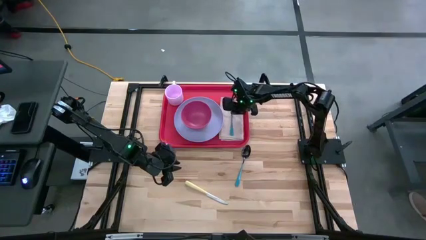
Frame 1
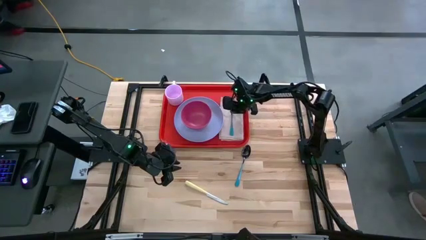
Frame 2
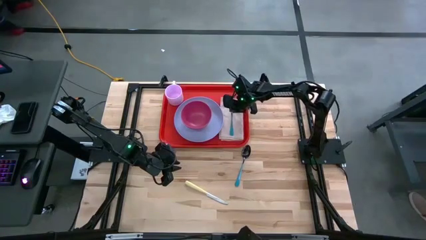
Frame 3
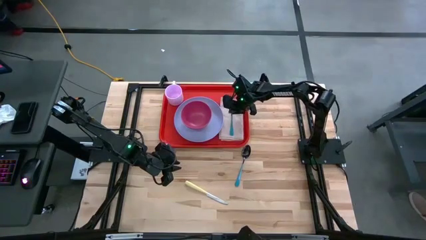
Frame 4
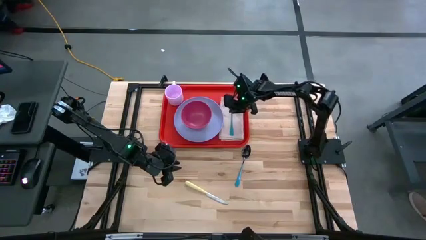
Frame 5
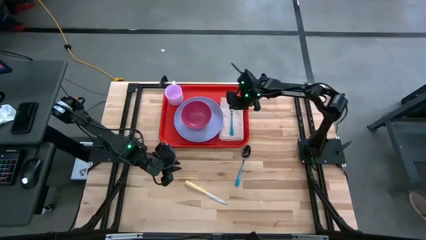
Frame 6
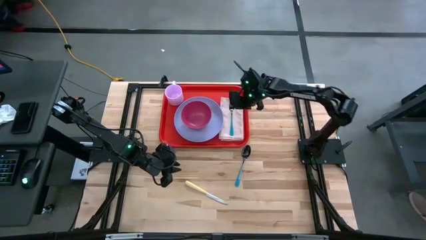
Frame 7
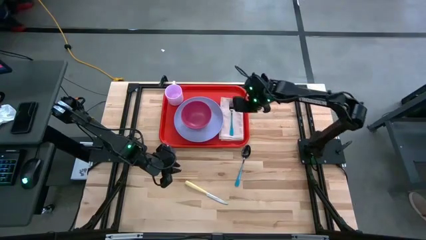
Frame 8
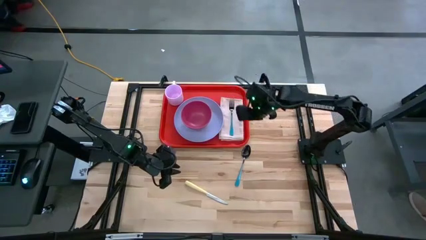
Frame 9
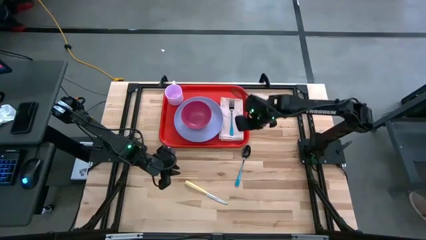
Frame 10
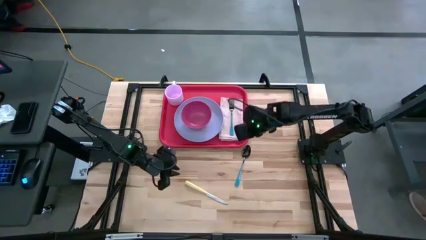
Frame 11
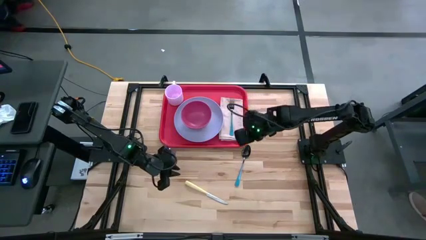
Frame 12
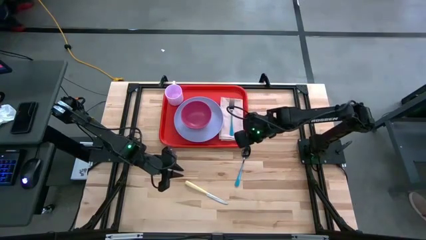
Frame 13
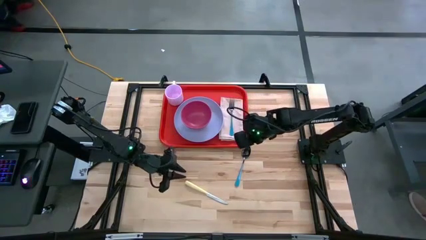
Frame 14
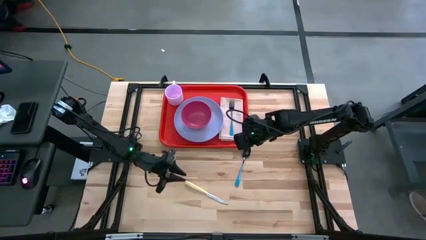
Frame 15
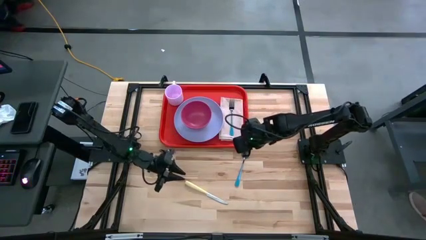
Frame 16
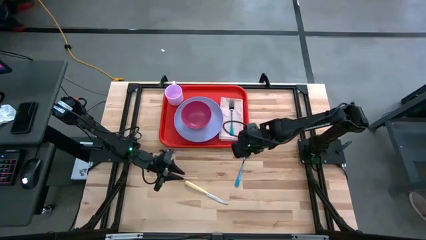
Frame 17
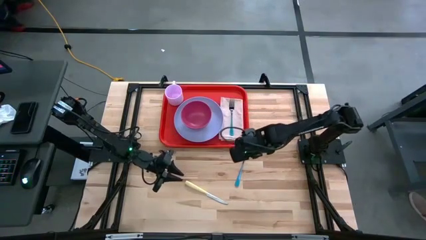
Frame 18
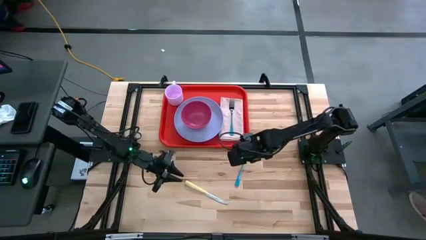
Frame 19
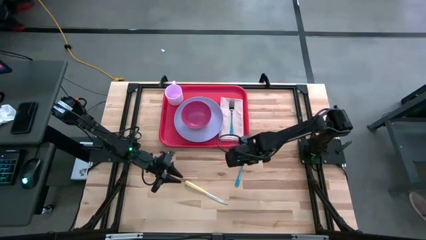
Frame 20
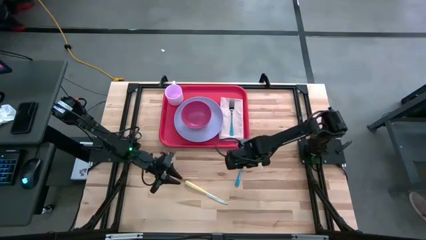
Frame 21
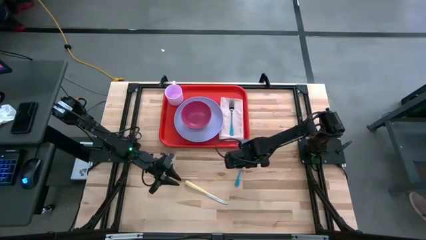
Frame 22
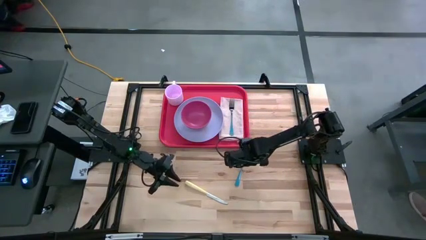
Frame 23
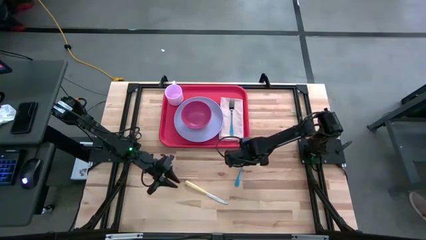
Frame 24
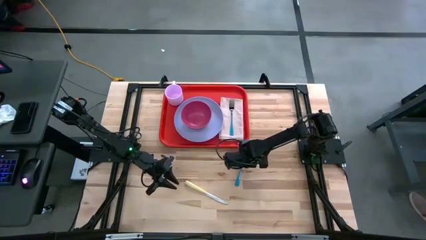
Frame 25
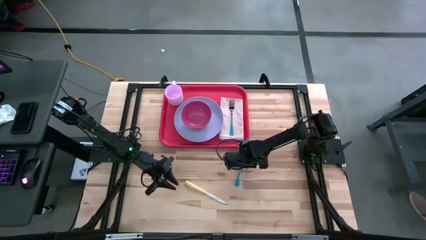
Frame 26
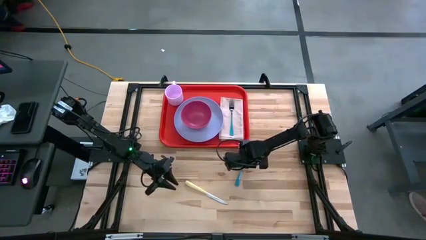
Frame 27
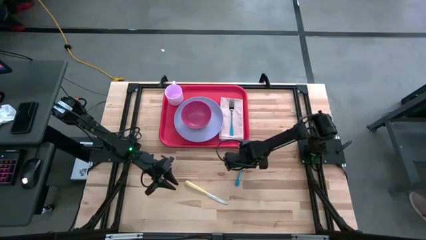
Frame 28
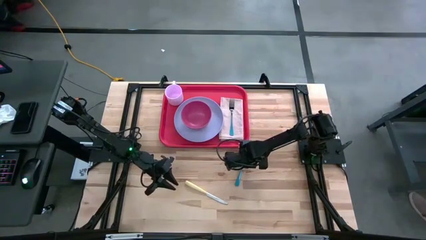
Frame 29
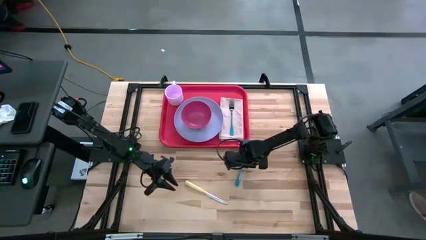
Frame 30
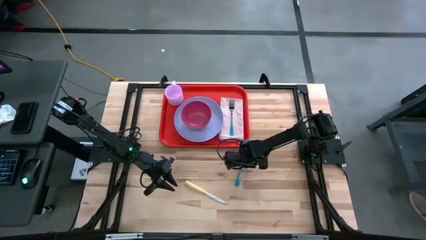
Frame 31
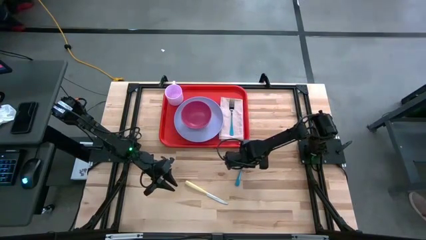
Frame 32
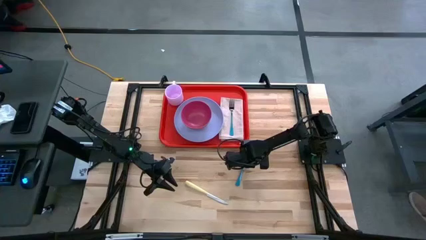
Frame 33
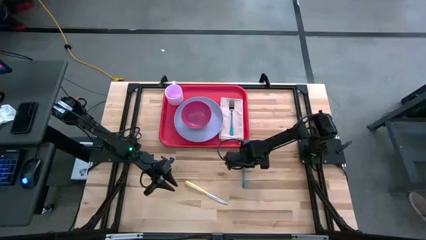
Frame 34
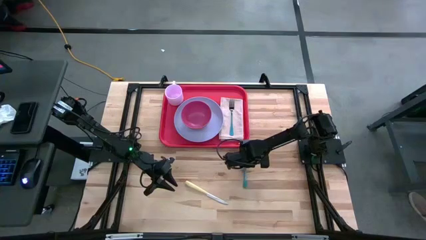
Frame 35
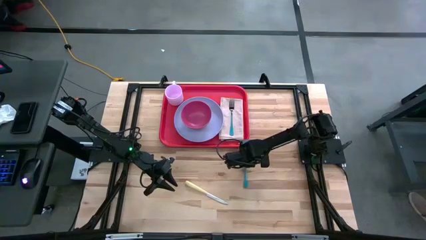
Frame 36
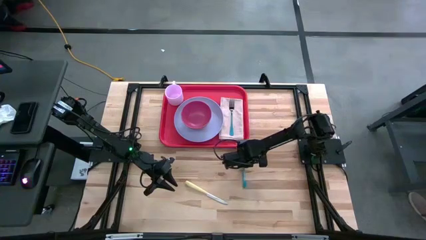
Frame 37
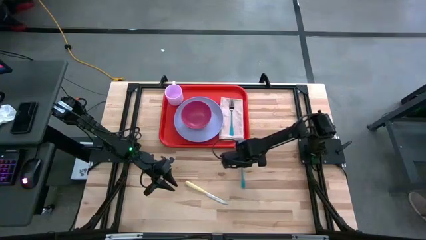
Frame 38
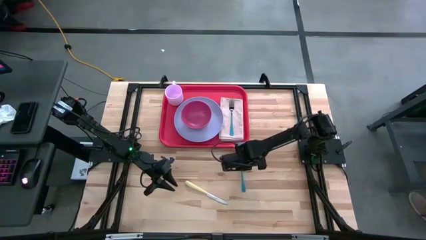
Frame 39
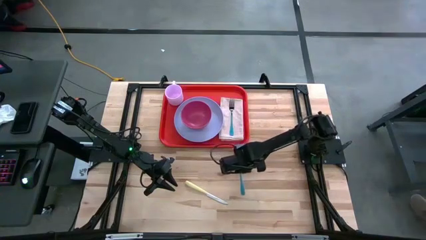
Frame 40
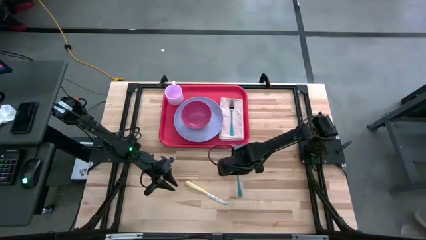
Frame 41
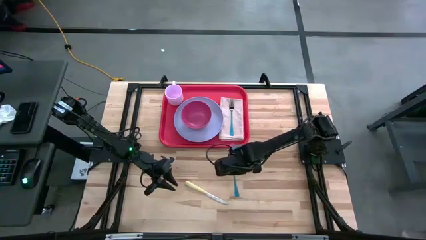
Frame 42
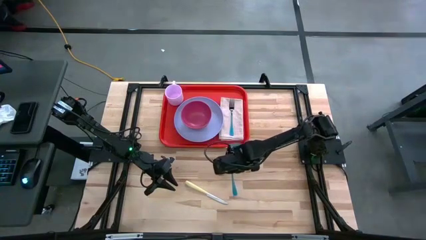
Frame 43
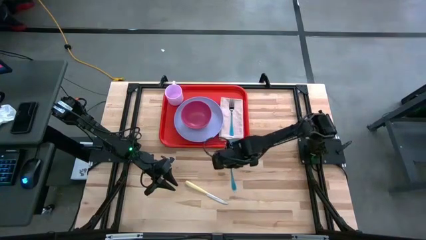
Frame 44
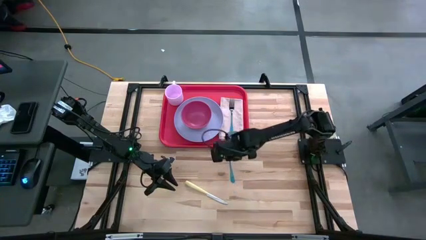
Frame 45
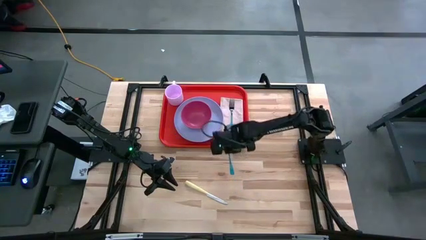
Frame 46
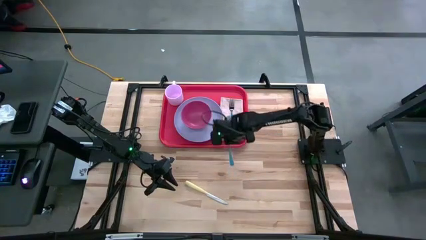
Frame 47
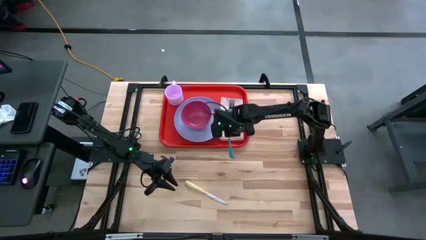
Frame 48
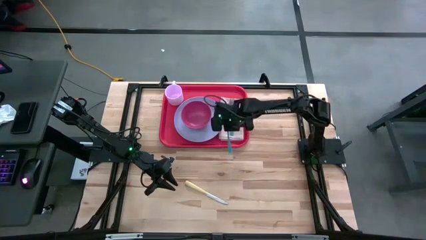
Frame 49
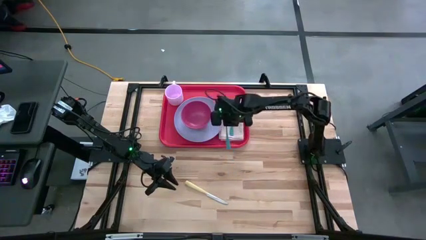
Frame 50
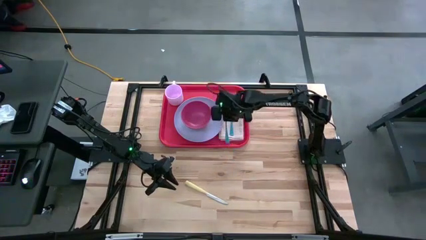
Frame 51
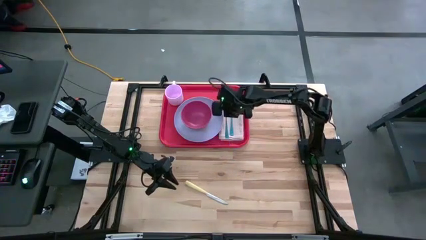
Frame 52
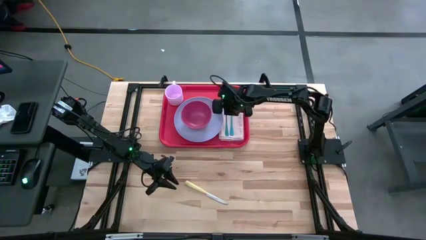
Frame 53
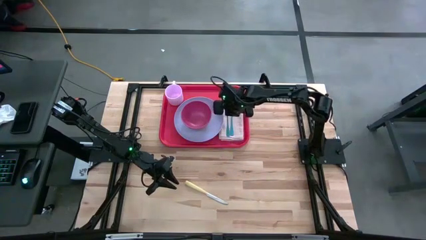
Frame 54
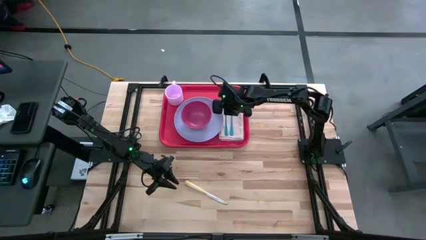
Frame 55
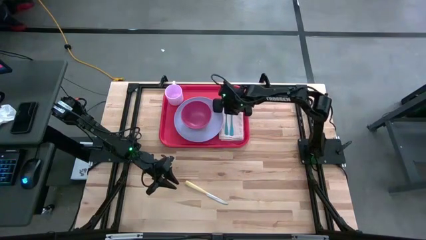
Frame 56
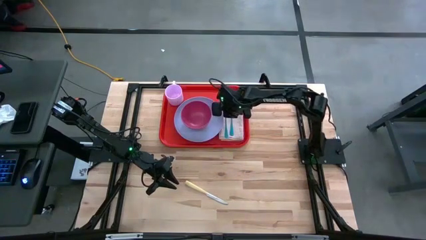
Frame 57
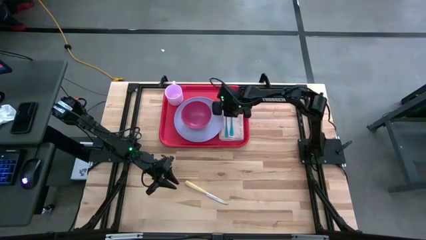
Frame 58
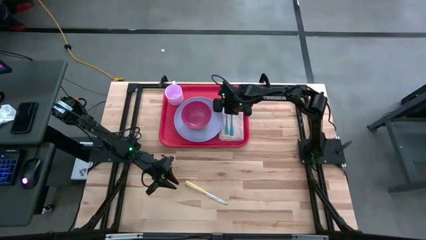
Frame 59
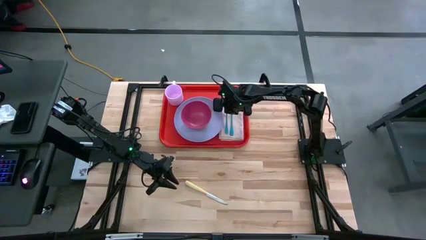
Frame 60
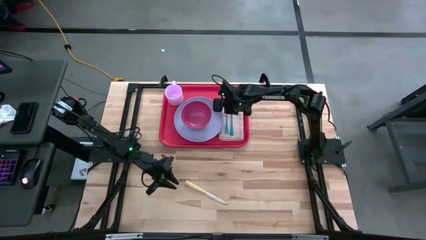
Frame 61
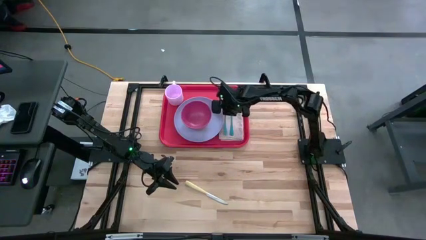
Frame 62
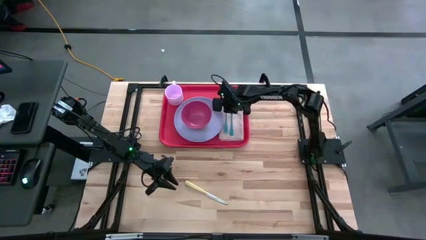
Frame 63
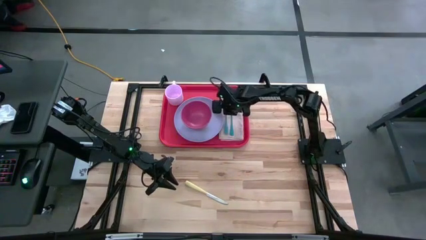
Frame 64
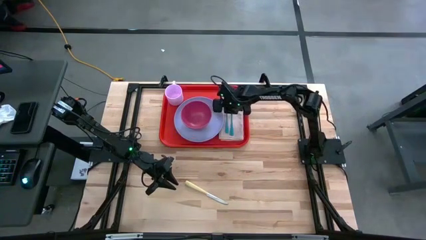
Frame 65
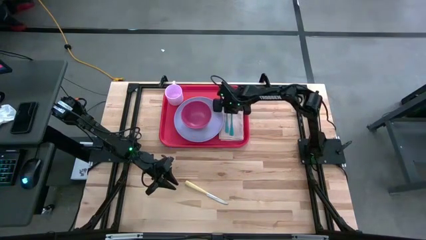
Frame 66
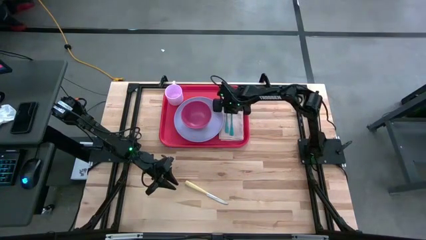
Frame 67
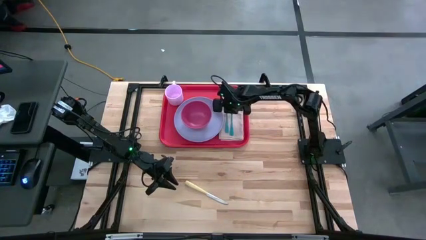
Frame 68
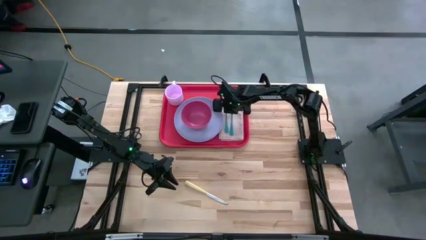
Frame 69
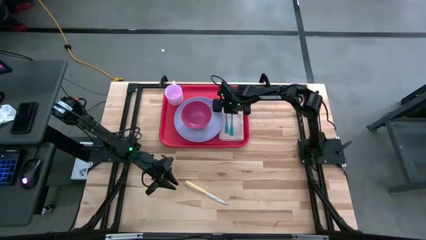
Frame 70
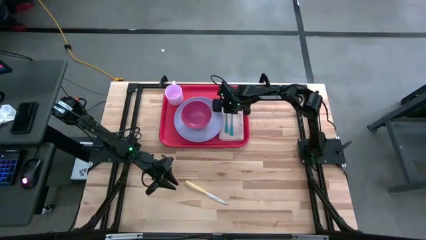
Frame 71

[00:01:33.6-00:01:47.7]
Task: Set up tray
Put the blue spoon on the brown napkin
